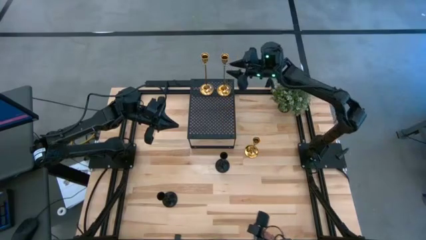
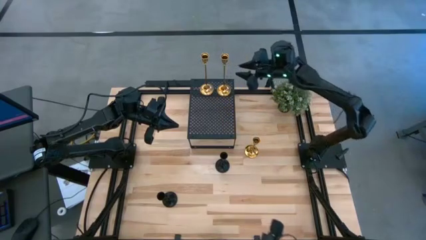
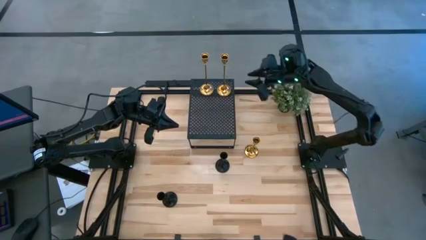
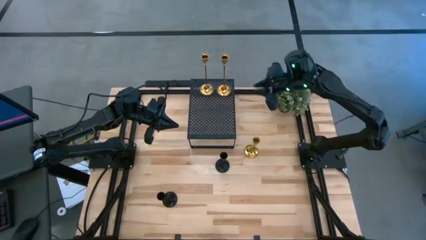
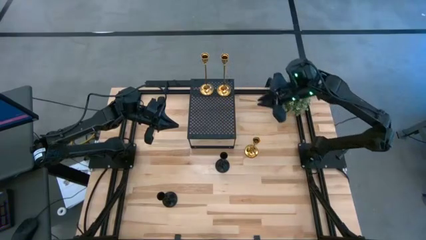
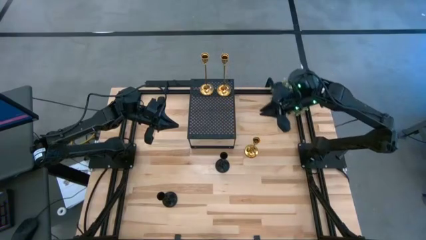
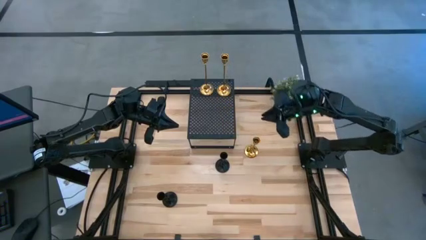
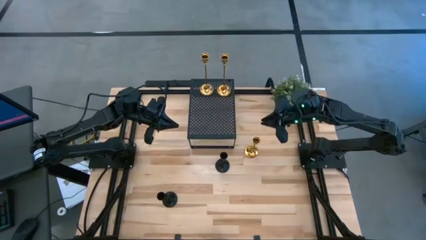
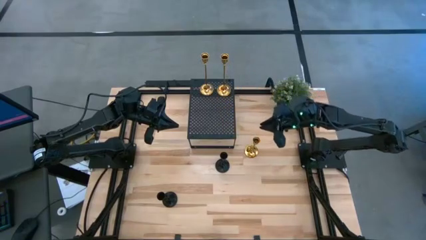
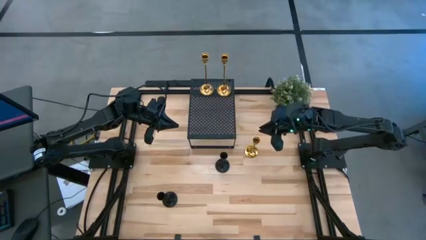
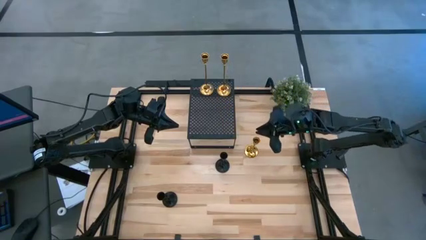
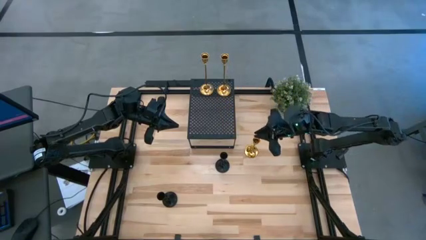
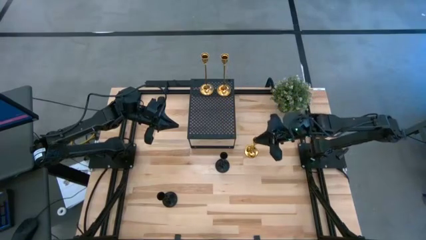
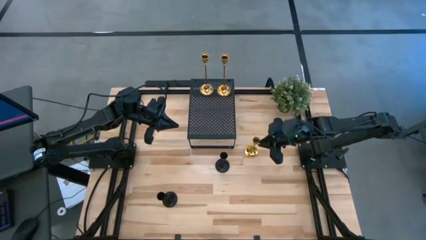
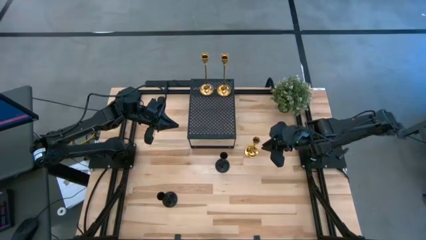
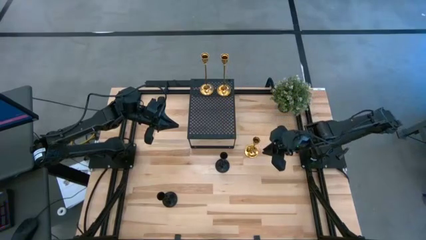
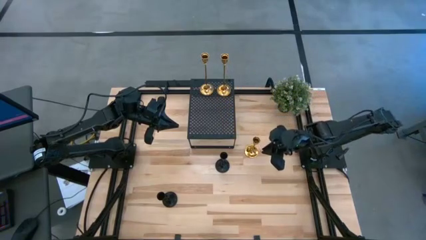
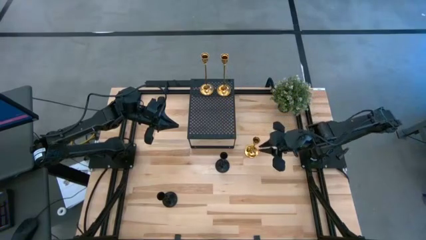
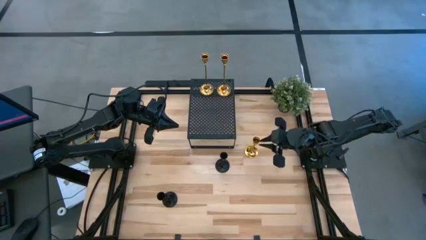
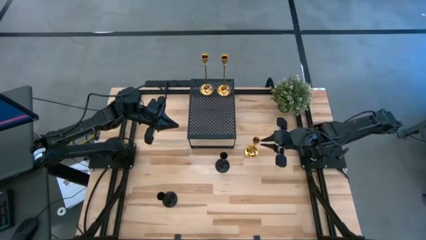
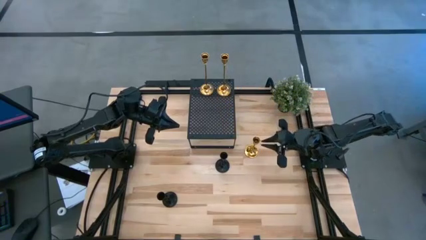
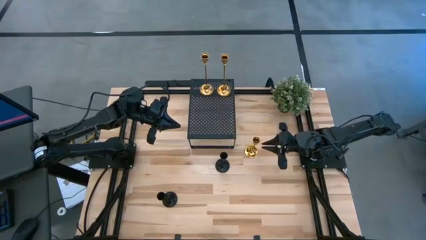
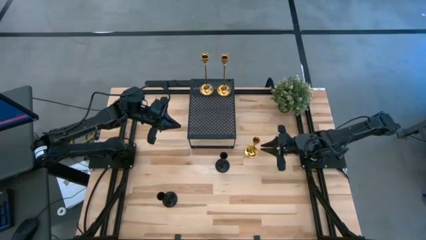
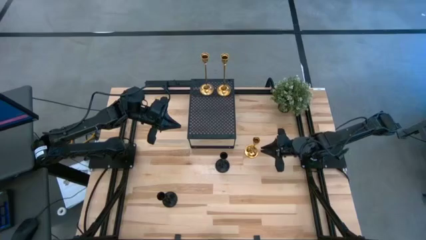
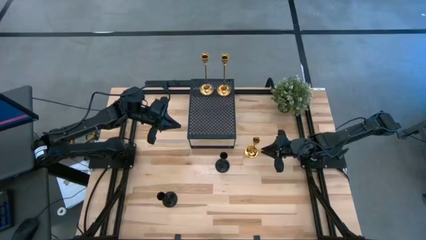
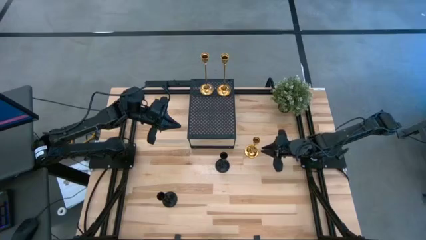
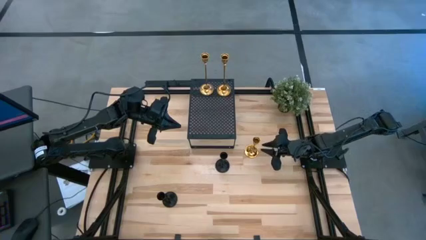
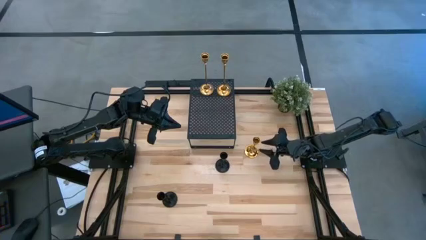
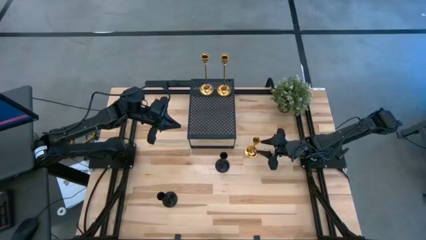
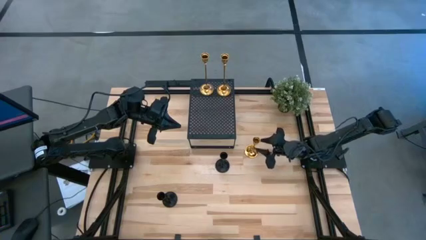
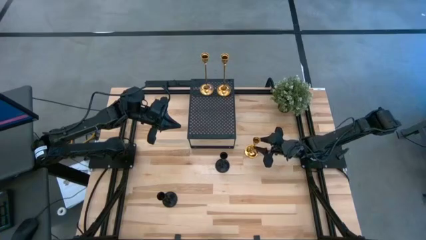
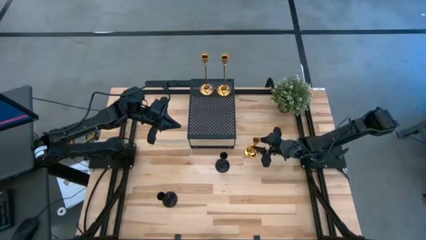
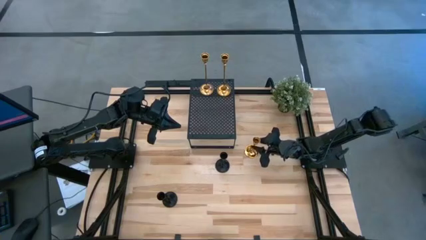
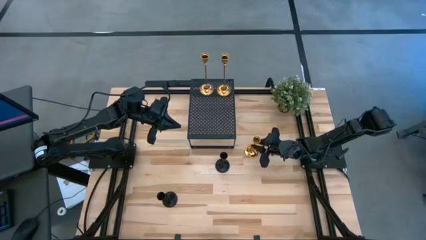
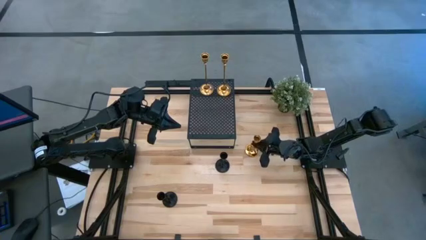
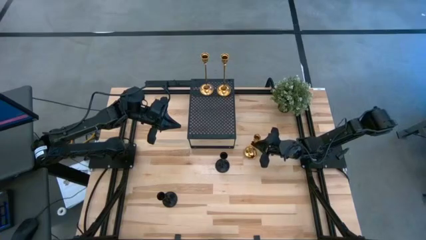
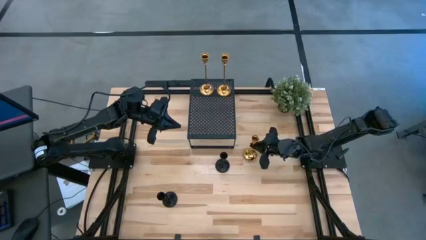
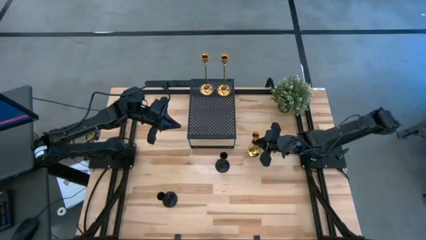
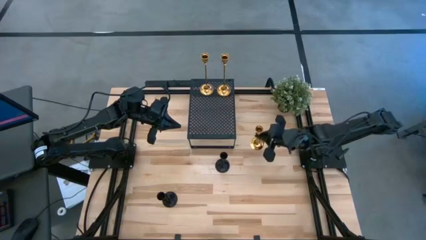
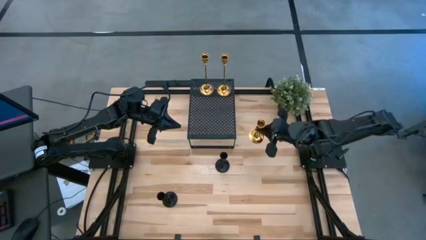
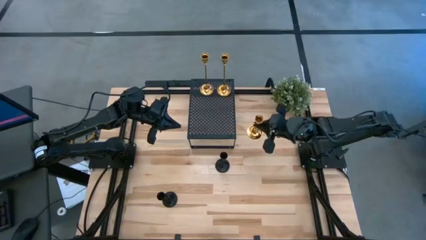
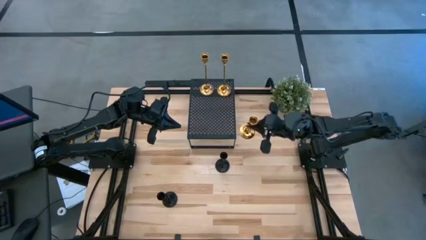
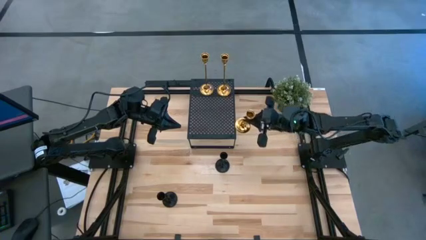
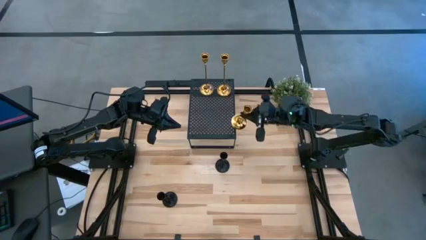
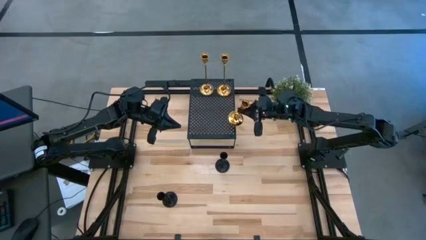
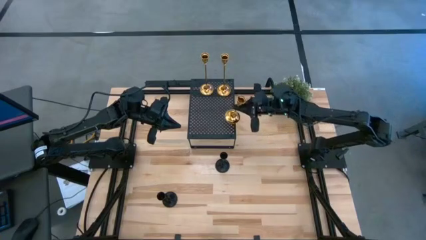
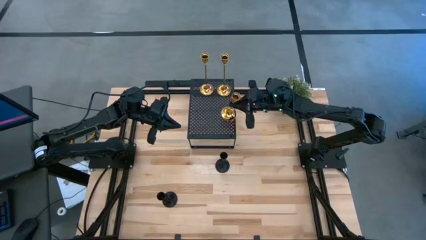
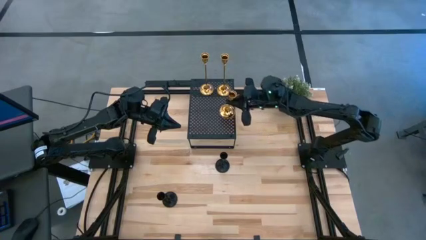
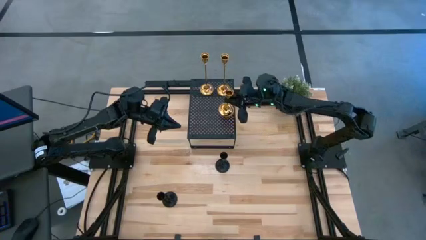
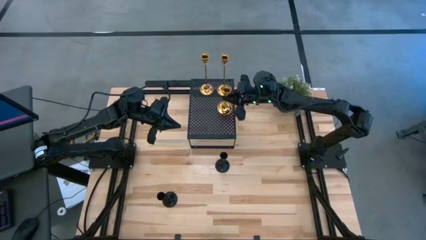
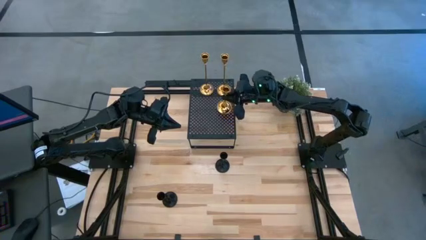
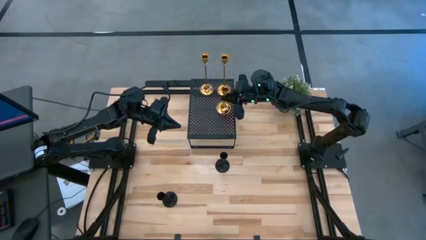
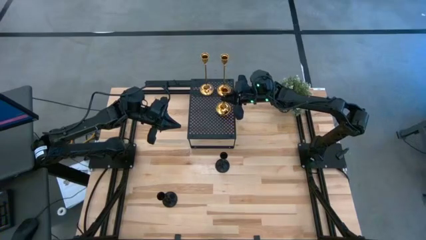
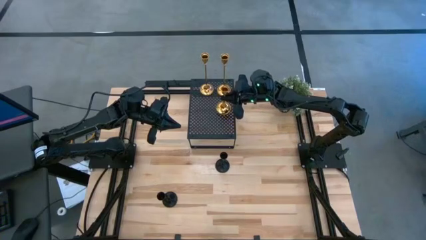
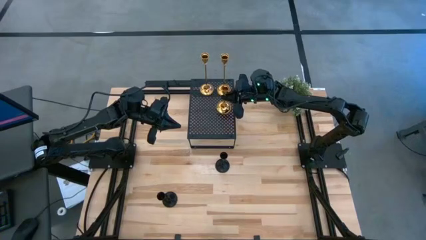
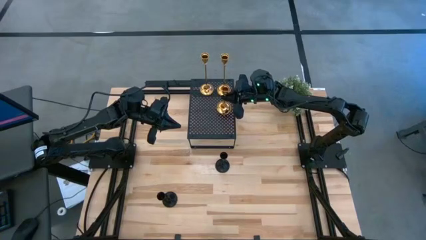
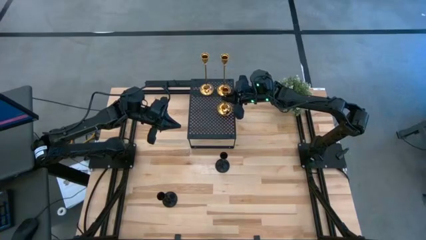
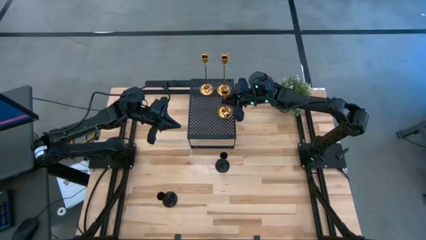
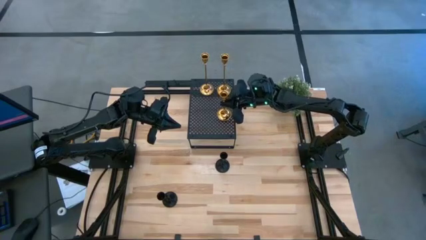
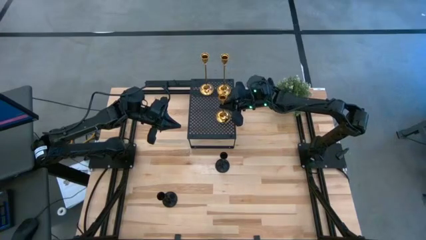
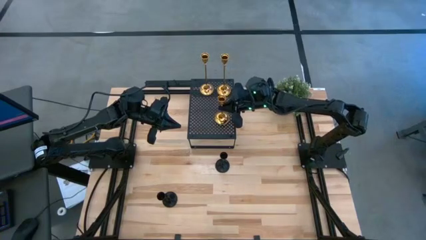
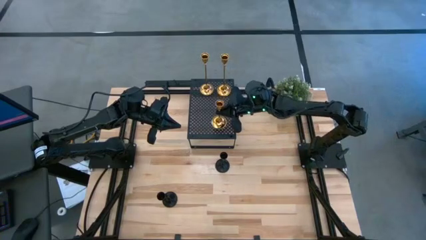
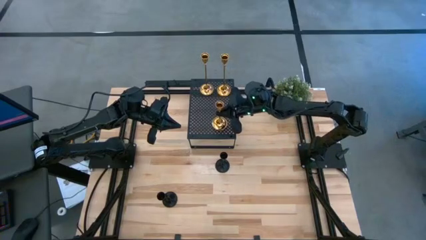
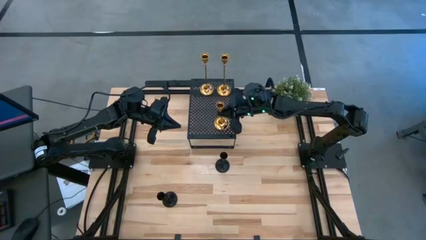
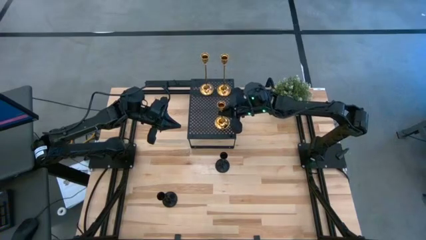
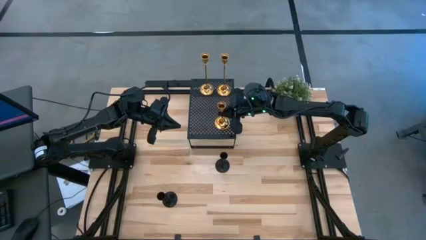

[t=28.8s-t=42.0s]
Task: Pick & Place candle stick holders
Put the bottom small gold candle holder on the shelf
